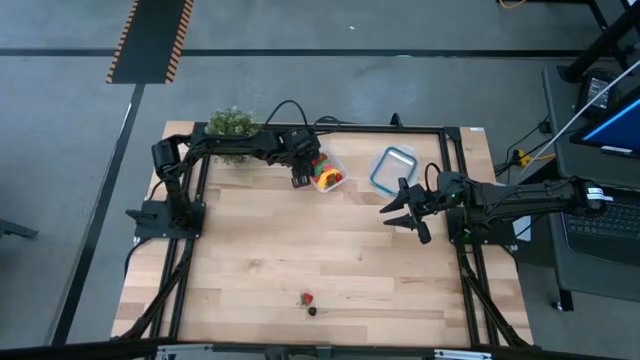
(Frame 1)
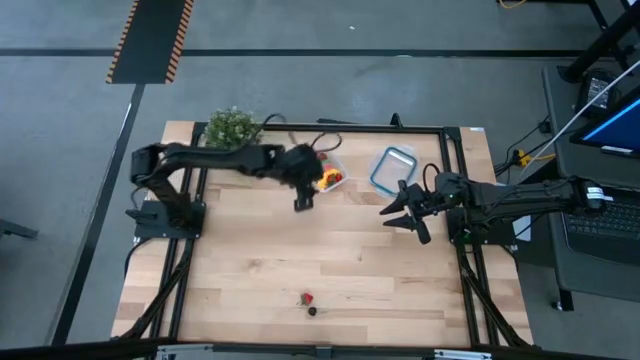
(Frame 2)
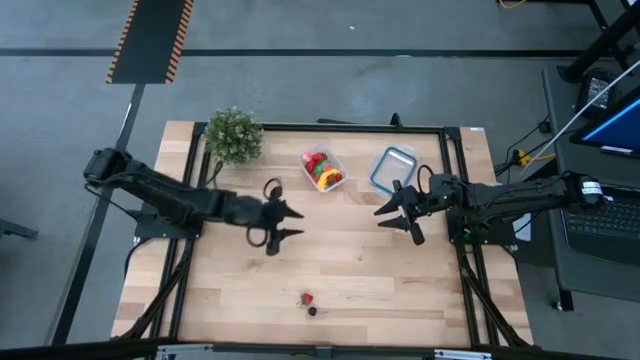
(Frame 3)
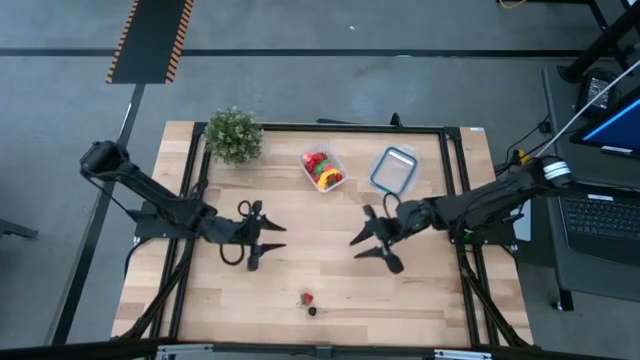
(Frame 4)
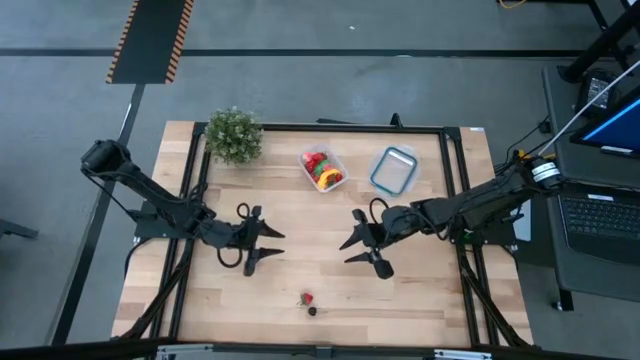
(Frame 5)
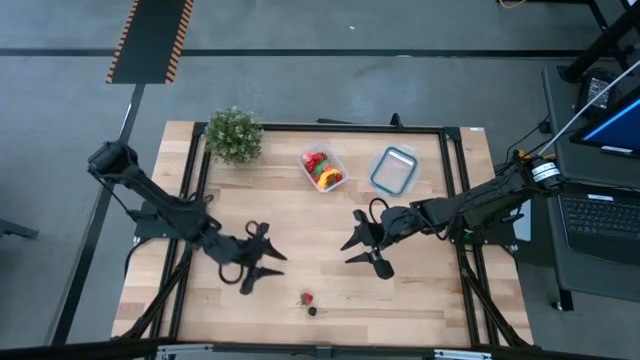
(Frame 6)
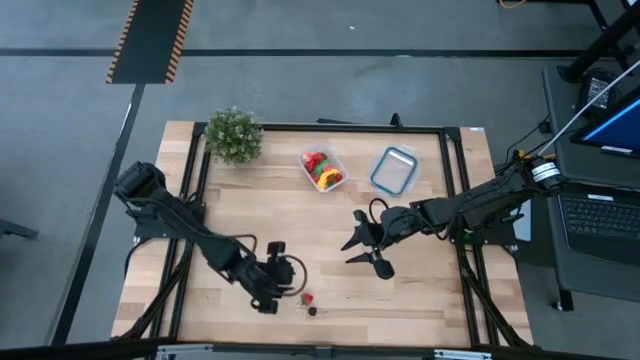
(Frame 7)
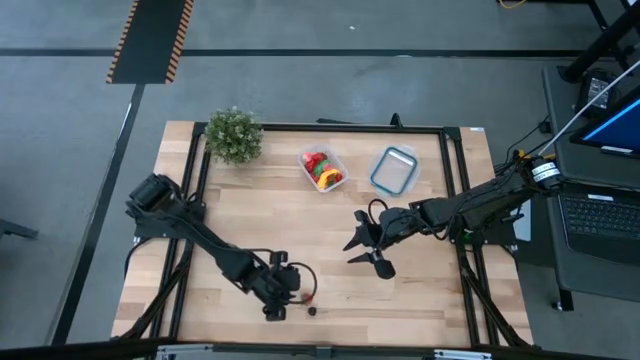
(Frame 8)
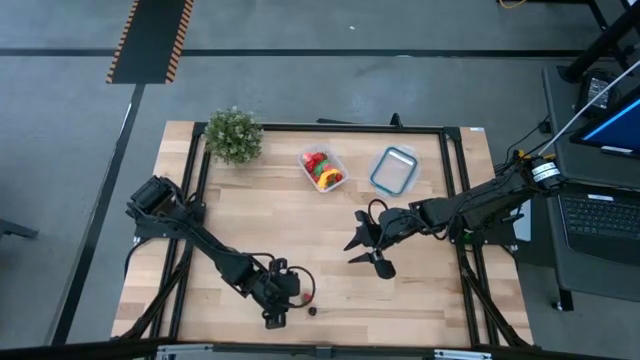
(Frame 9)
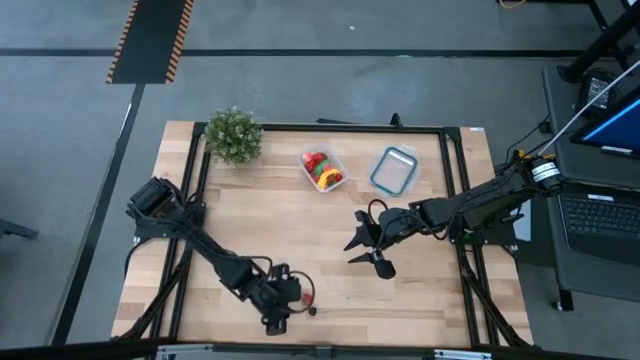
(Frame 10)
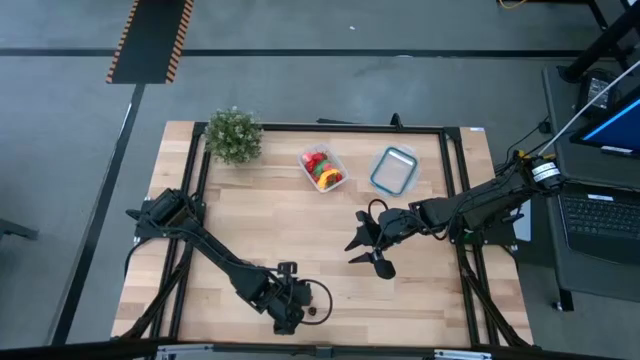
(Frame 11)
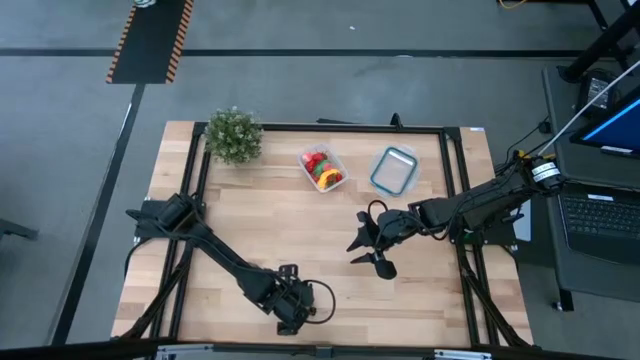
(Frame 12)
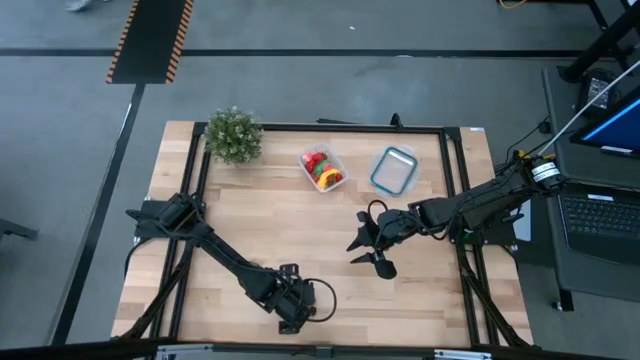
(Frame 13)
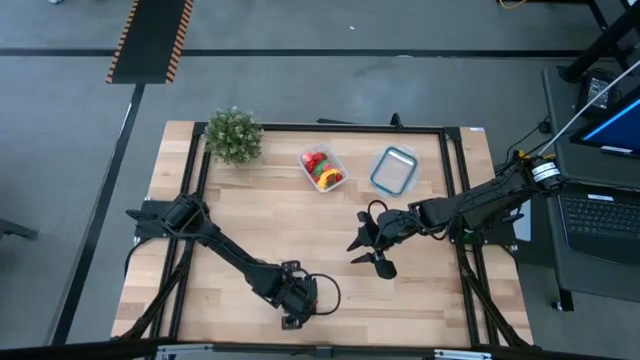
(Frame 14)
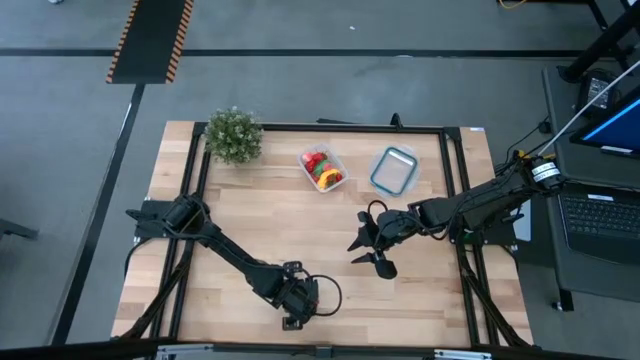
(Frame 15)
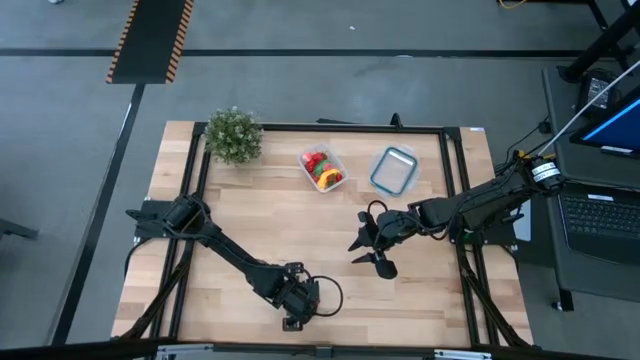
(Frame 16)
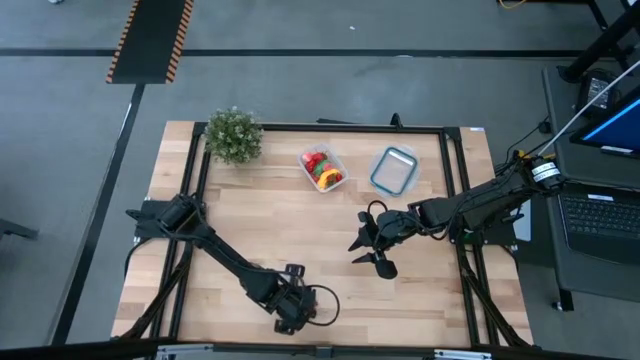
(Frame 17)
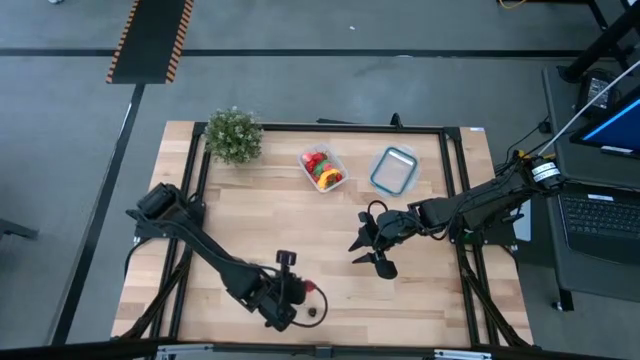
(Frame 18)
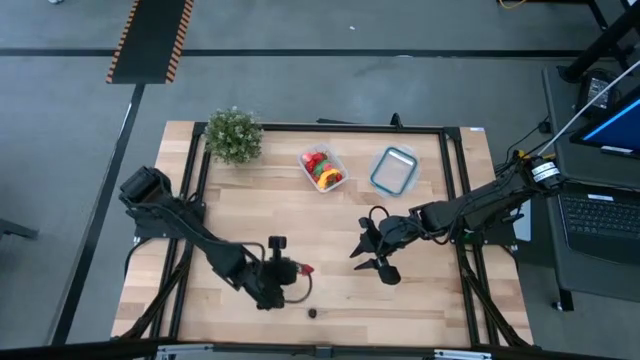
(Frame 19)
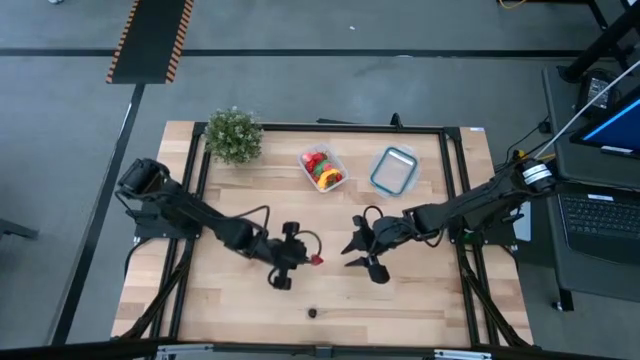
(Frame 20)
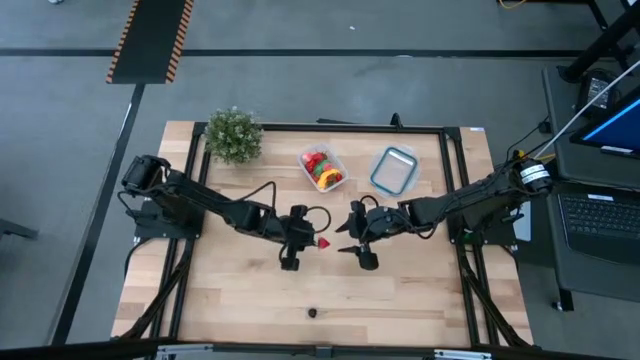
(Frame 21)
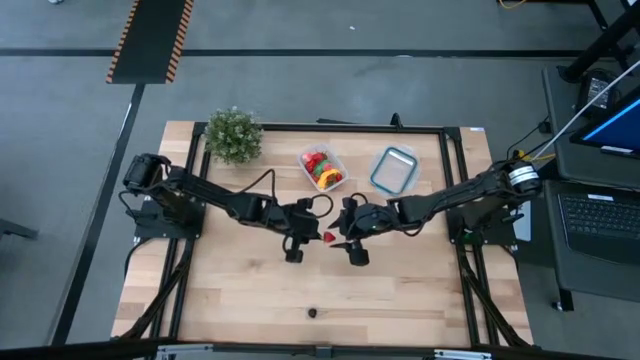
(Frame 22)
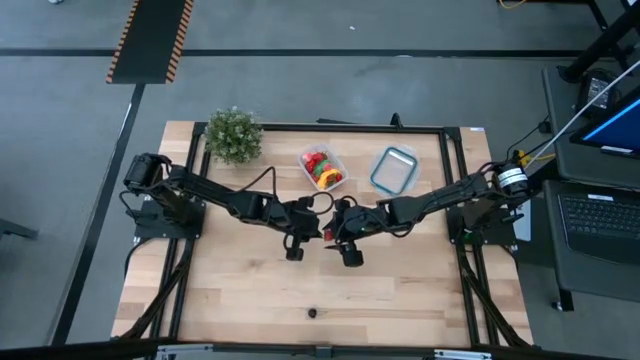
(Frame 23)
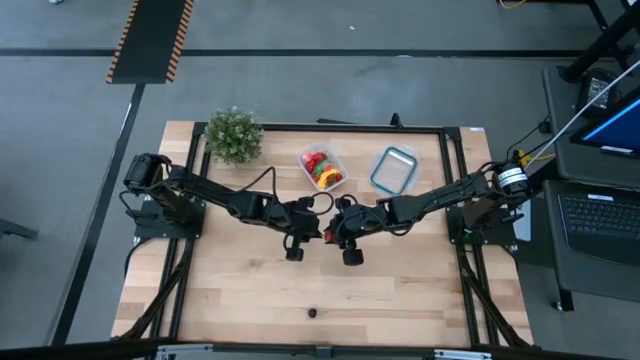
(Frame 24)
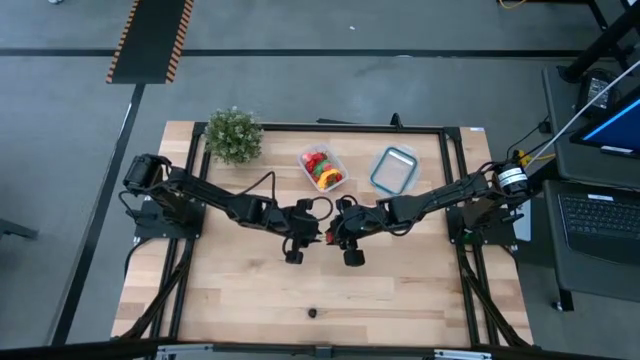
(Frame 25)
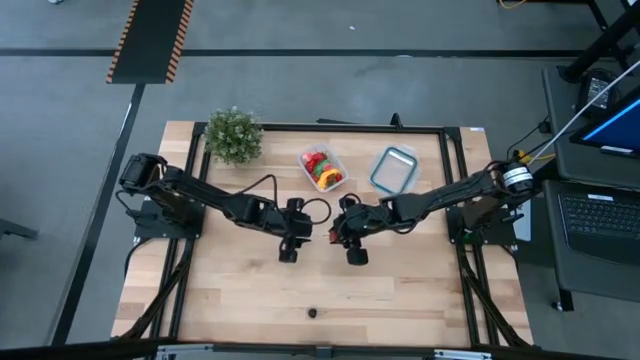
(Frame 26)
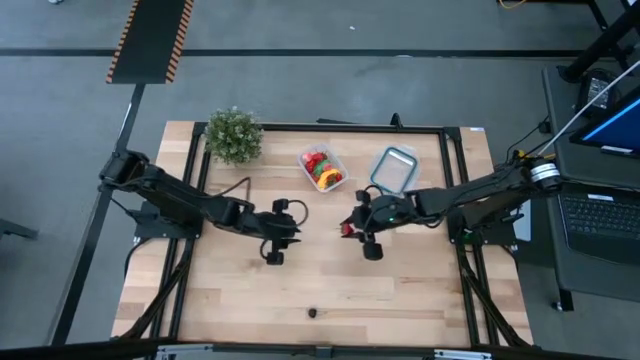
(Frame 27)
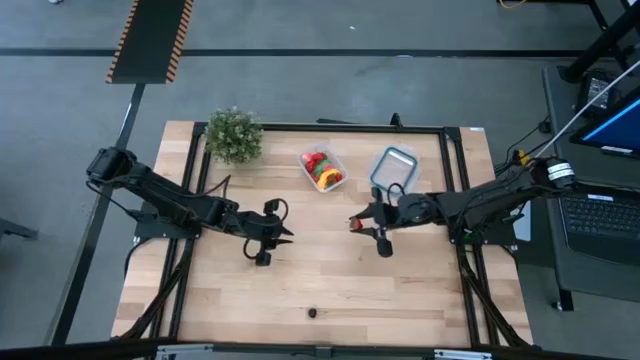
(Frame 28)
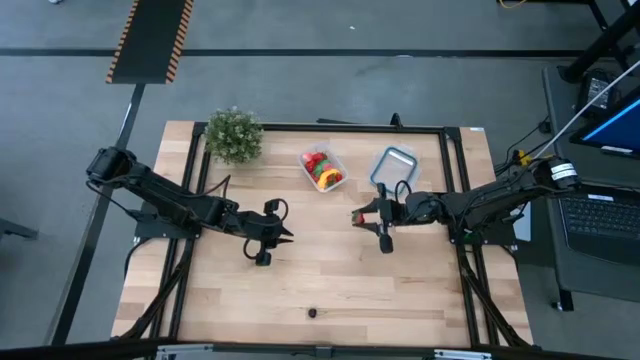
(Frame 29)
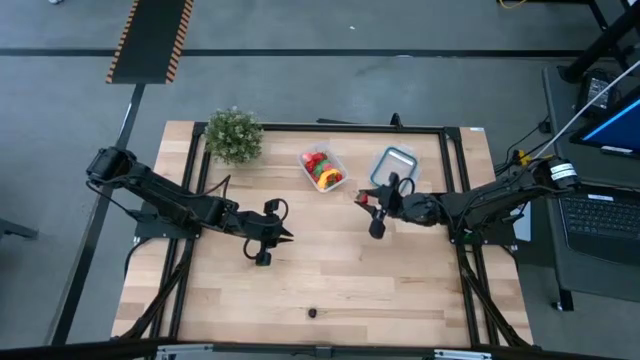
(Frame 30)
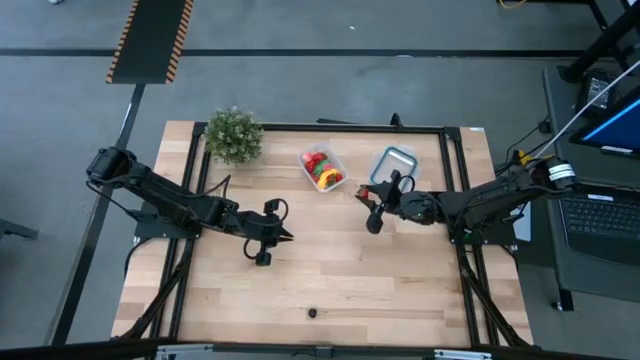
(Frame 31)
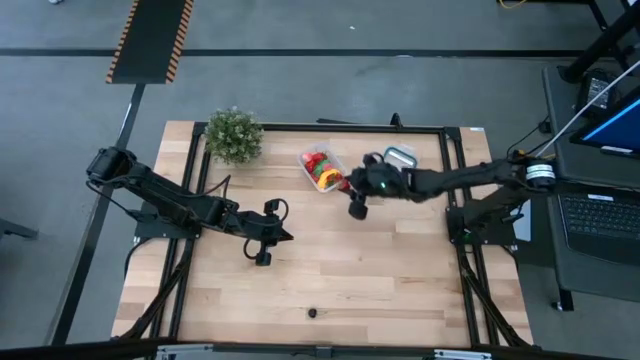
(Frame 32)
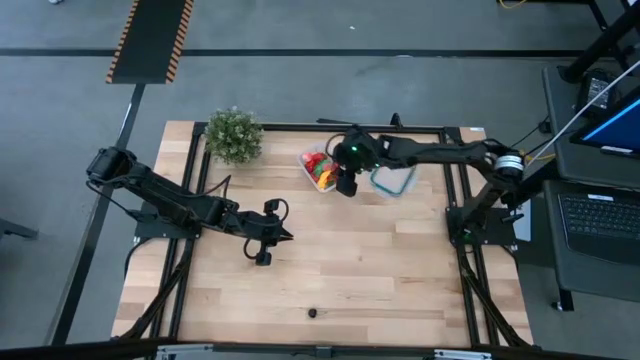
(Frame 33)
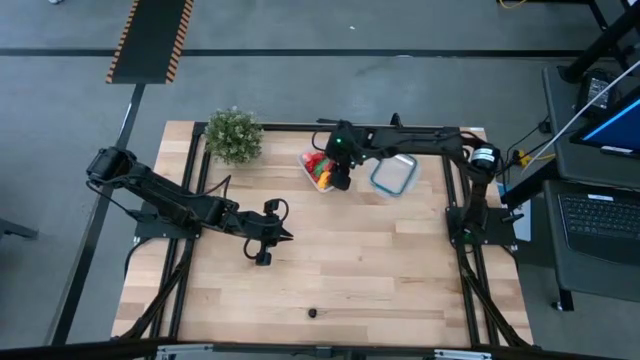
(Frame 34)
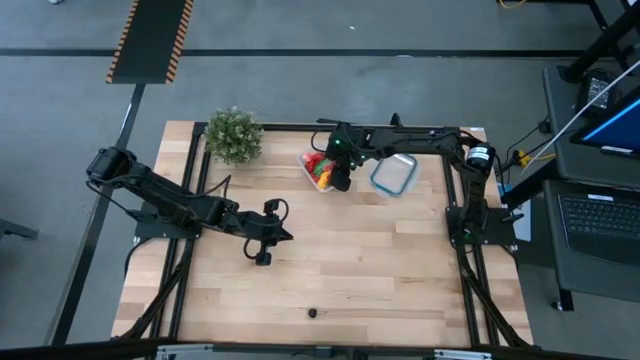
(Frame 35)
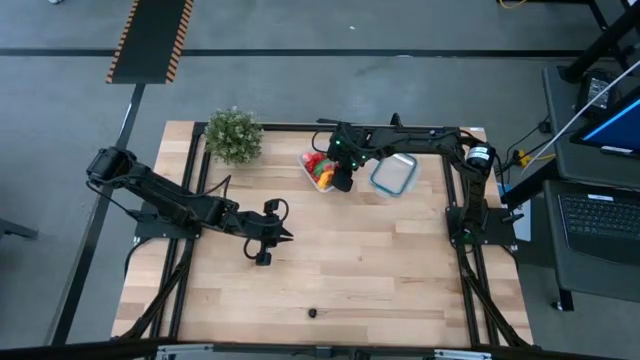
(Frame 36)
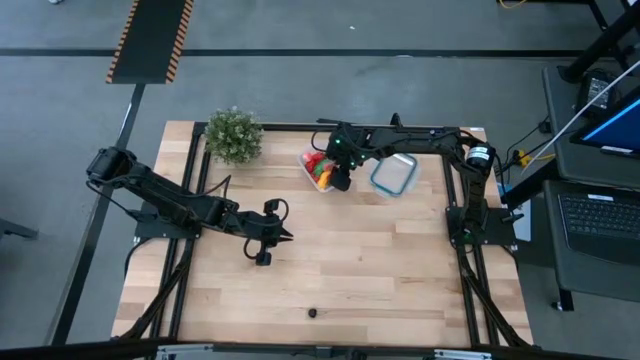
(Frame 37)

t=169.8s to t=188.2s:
Task: Pick and placing Produce into tupperware
Put the red strawberry into the transparent container

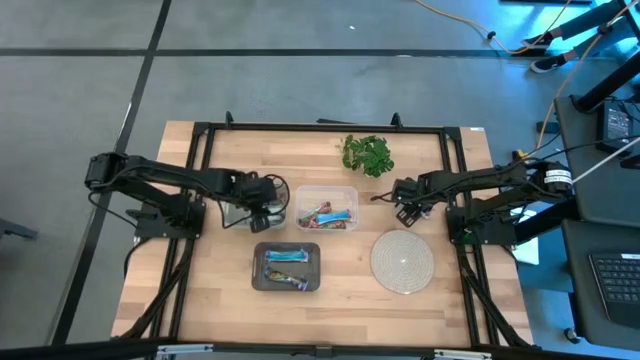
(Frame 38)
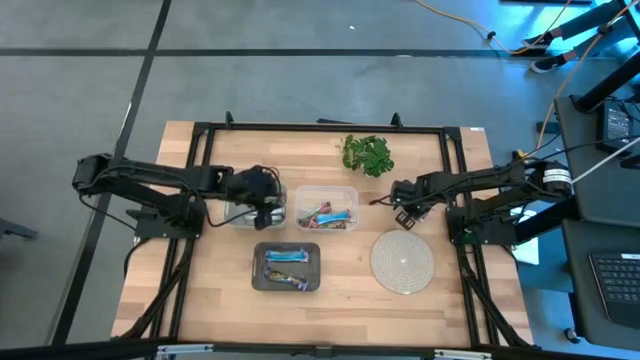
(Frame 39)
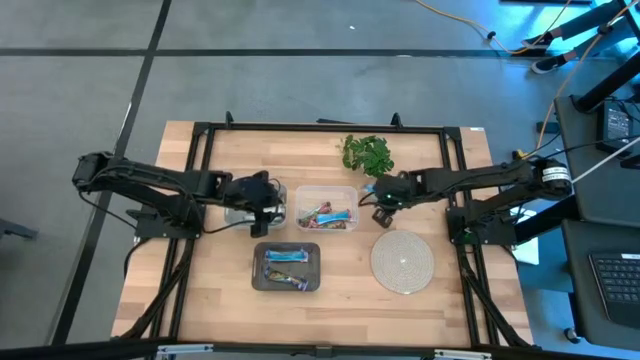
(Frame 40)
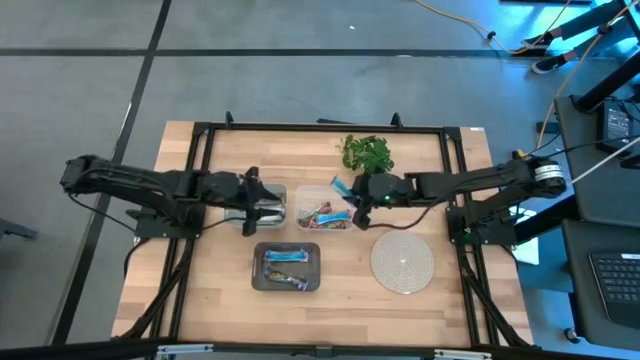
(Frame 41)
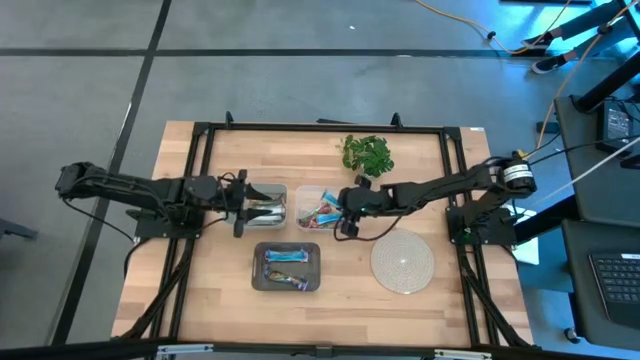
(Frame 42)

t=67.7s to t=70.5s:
Task: Pick and place Granola Bars by type
Put the red granola bar into the white transparent bin
